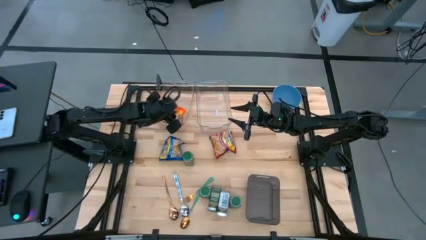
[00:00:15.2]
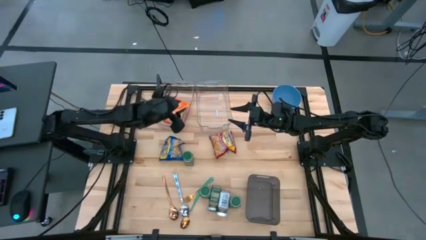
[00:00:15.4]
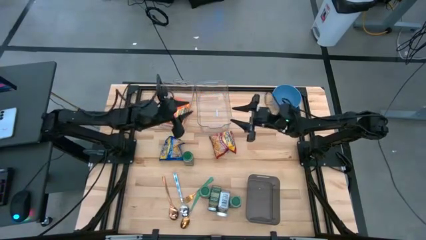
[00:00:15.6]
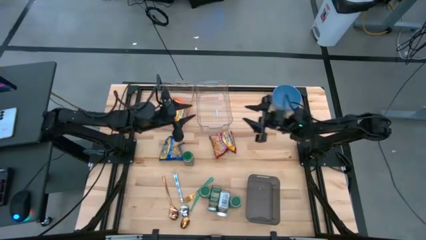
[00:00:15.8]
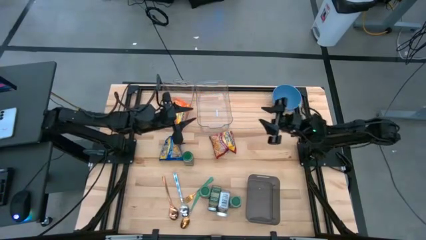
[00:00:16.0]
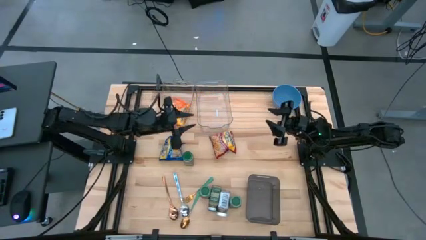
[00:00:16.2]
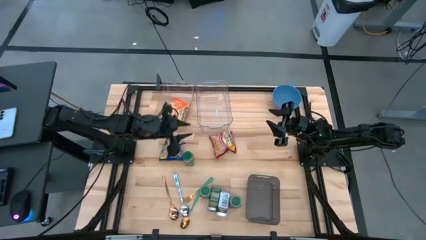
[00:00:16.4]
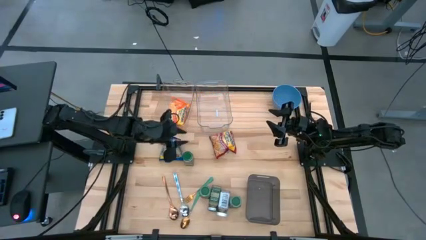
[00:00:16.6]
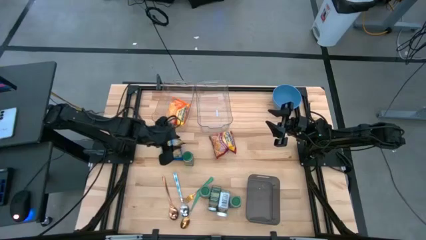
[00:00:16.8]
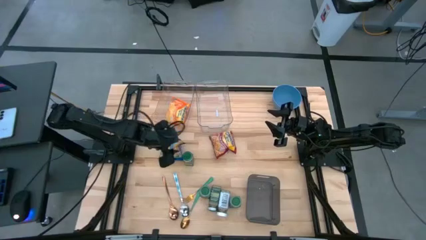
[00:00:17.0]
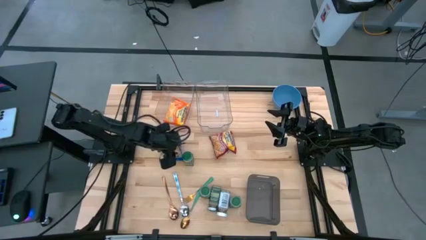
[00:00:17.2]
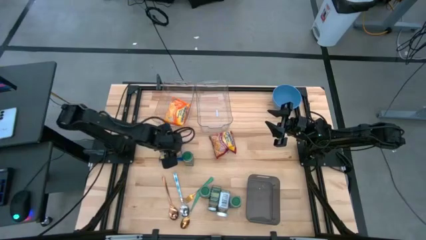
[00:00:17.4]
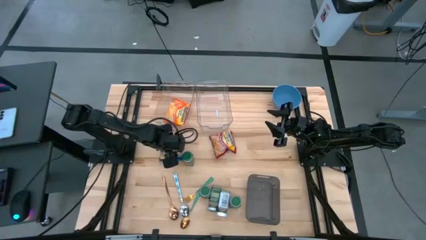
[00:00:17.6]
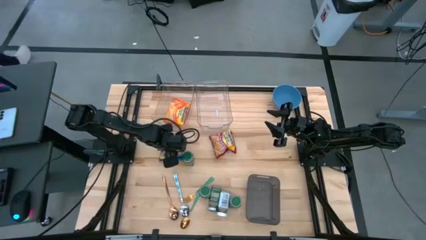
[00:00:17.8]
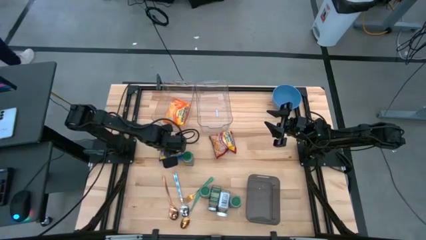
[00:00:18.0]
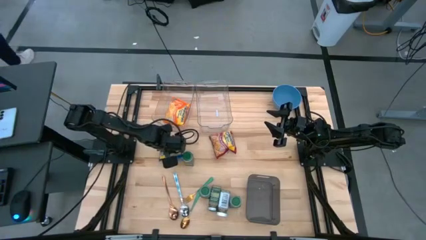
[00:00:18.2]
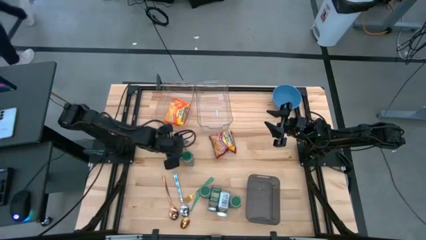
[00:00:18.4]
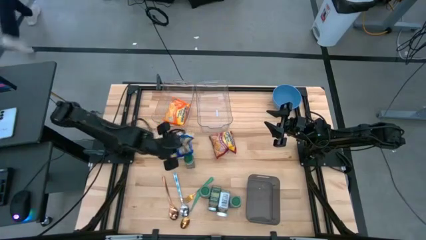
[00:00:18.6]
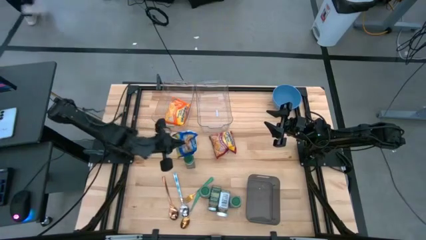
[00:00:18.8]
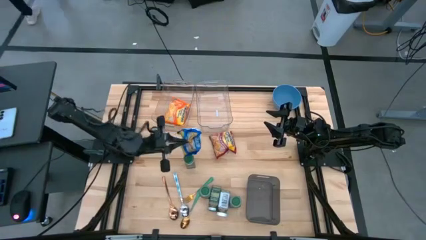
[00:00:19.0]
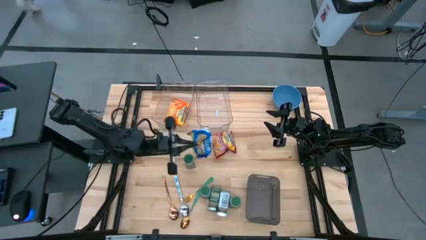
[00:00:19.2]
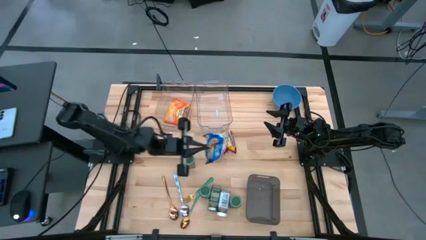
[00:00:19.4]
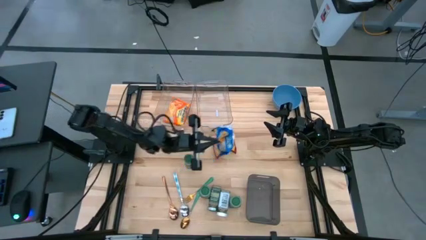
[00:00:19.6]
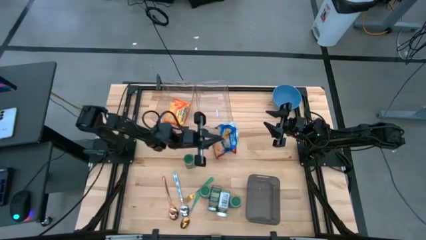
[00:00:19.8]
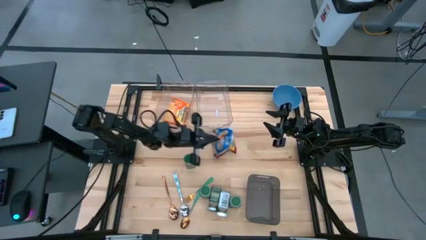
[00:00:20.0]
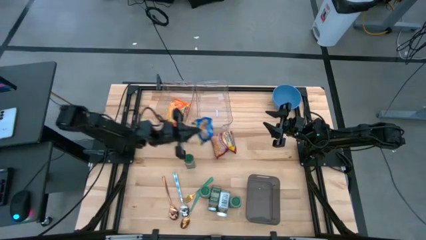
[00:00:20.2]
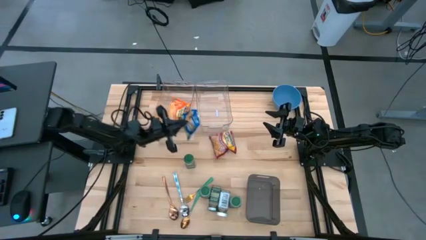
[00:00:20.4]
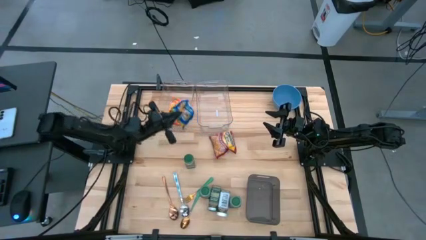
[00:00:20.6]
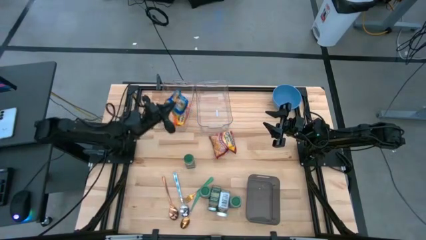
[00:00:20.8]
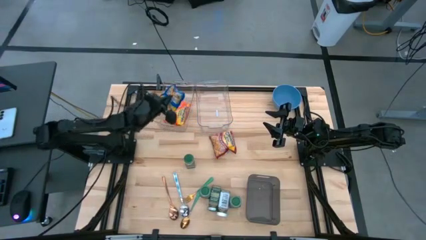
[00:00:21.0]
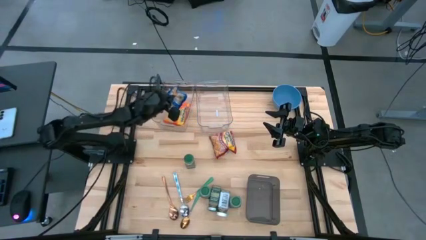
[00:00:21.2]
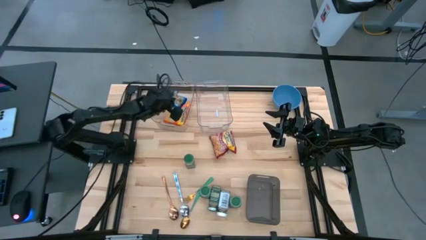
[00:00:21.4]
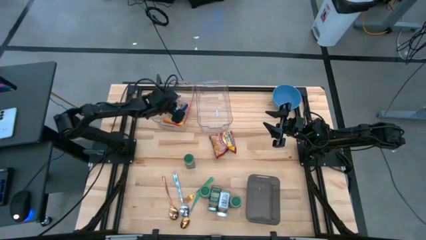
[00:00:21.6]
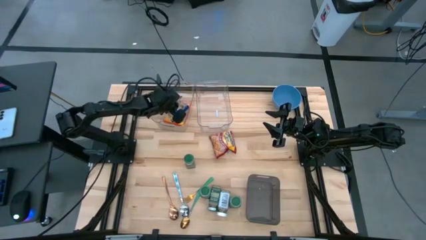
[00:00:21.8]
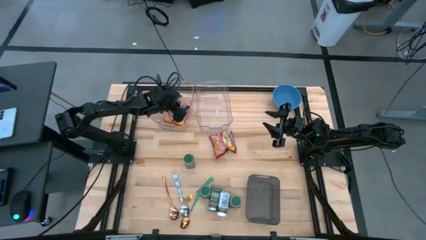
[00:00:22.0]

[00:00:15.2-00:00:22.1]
Put the blue noodle pack into the left transparent bin

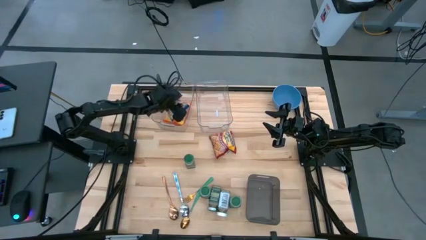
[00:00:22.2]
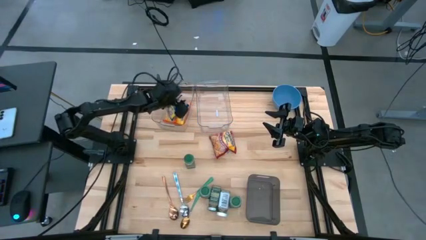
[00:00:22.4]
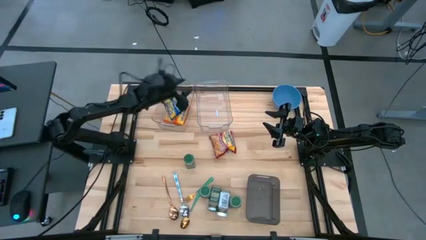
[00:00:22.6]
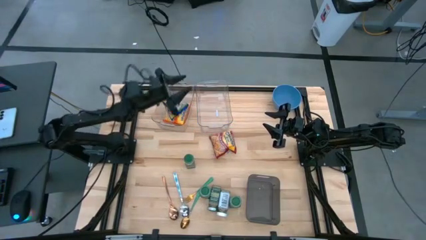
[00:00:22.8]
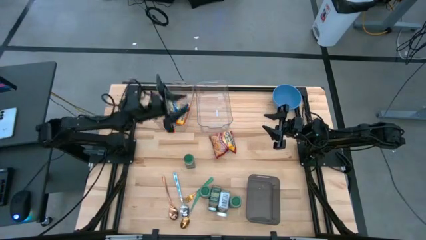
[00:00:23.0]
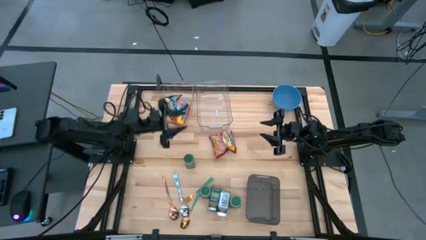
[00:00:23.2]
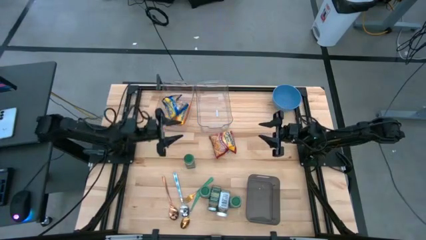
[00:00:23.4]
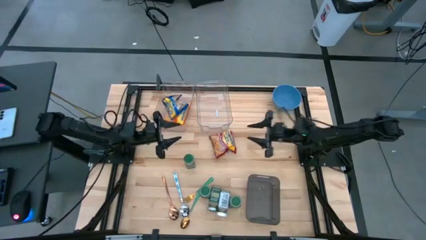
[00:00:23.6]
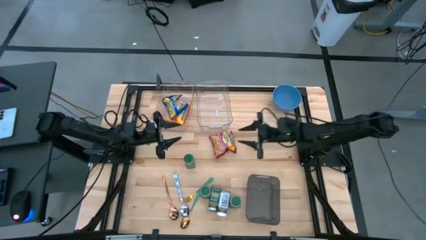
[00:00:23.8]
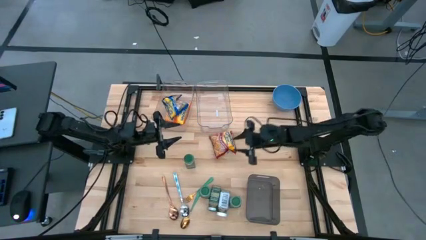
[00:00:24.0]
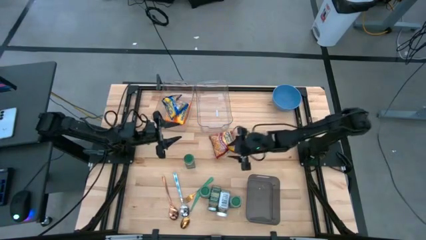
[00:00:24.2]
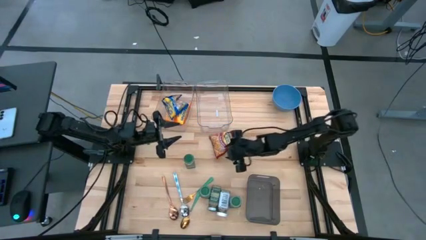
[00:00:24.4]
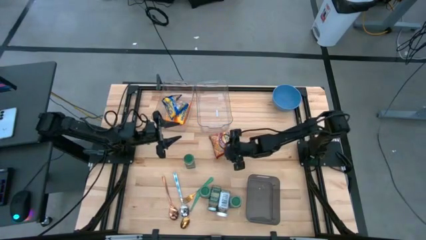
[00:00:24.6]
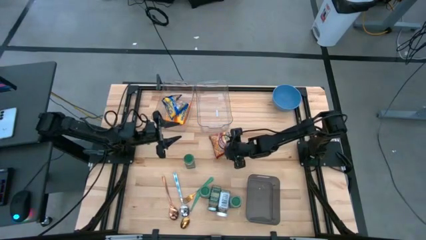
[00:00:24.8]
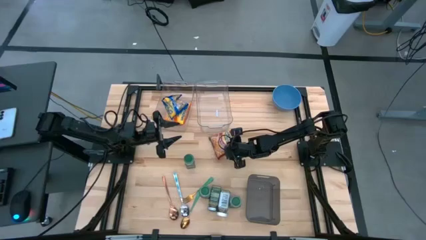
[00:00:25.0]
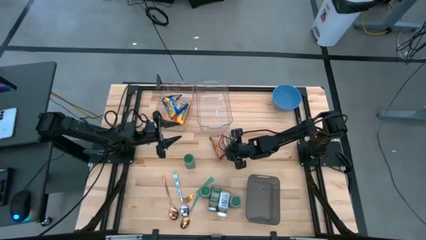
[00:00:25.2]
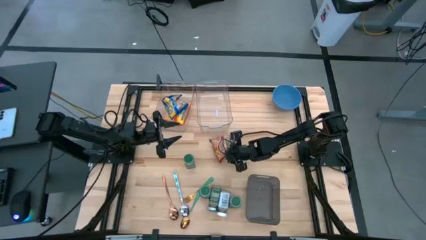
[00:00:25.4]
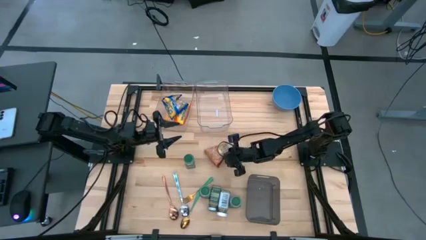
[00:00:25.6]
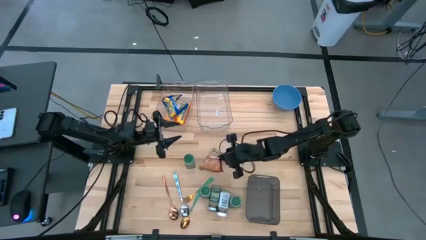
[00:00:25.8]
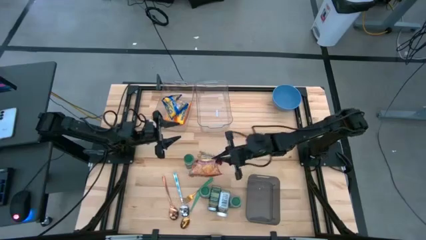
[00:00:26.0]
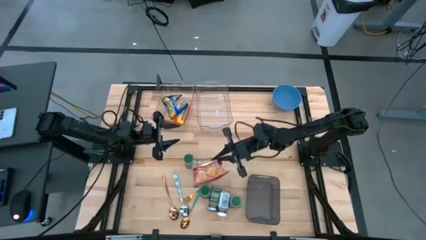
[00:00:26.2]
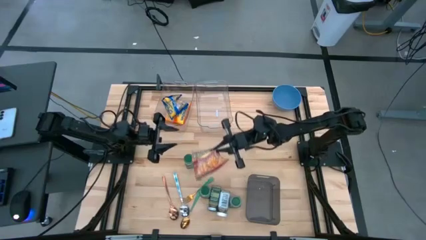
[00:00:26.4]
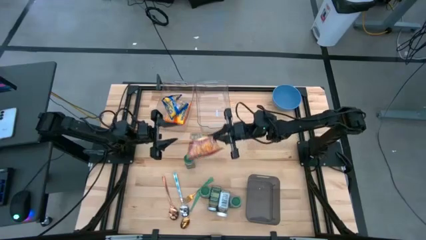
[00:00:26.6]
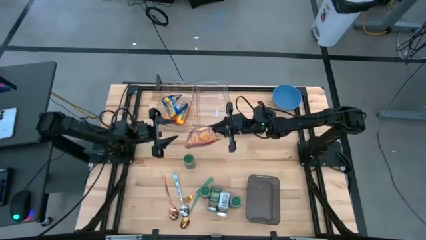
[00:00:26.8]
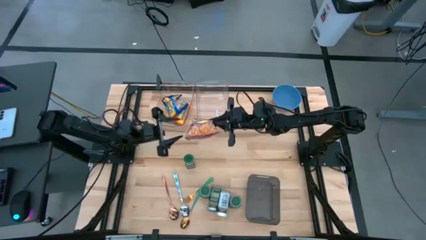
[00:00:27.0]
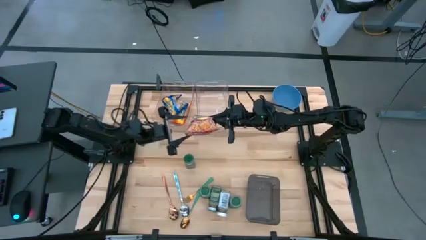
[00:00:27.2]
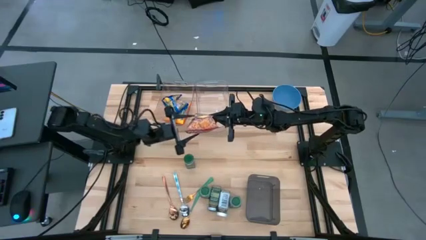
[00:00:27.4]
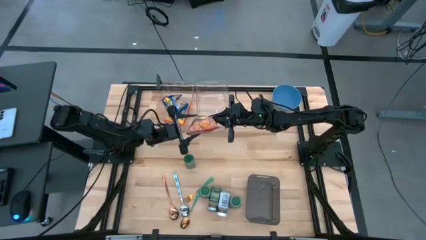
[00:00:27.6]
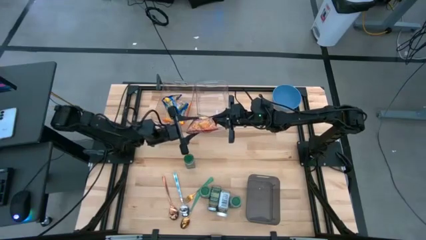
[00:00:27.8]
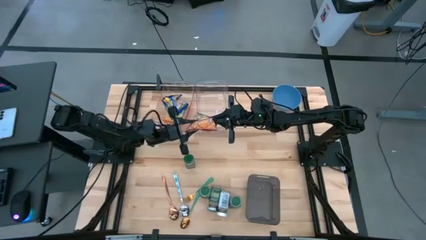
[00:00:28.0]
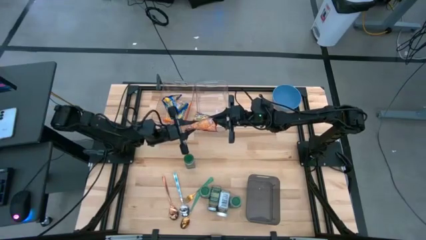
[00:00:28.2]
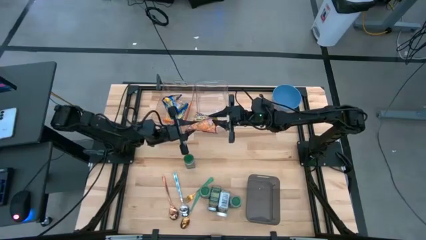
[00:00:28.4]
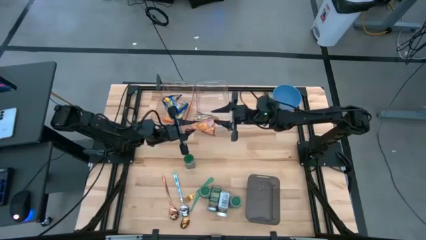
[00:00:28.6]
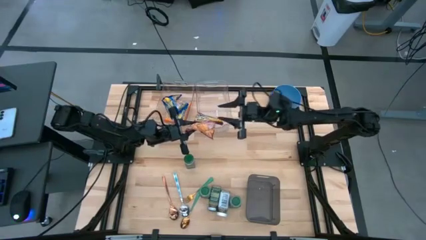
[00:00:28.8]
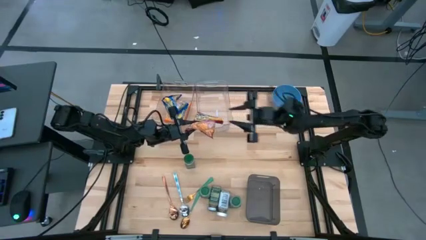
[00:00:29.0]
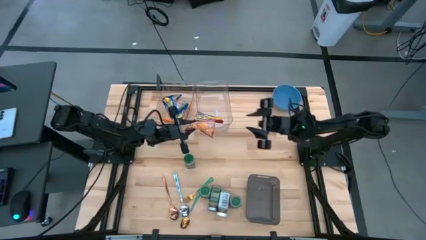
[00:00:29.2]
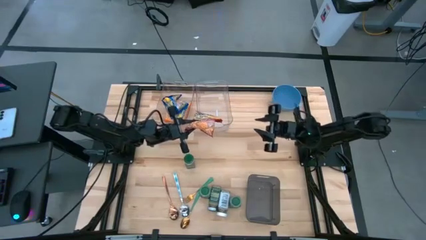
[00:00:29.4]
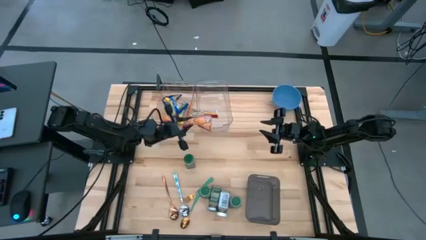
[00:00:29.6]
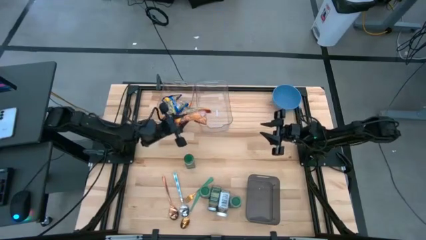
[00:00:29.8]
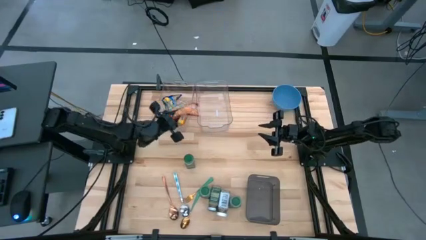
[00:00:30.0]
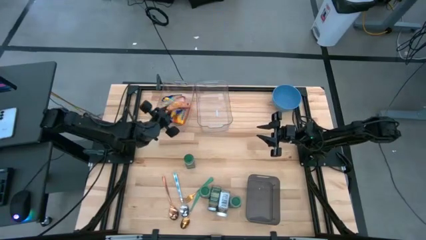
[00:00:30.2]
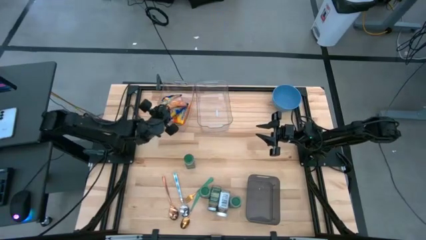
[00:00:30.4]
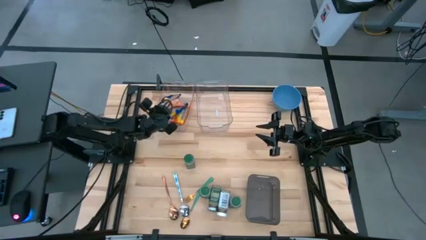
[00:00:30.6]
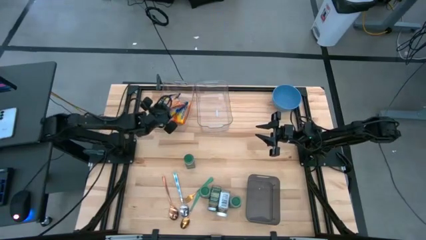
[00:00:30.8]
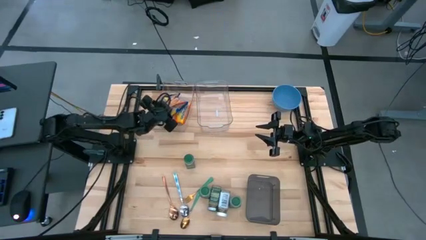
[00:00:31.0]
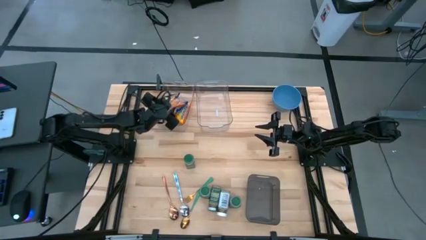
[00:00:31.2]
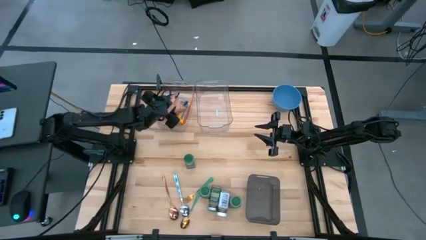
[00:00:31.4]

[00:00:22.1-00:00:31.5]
Put the red noodle pack into the left transparent bin
